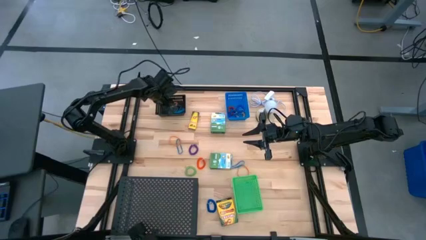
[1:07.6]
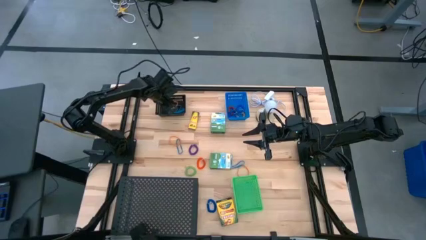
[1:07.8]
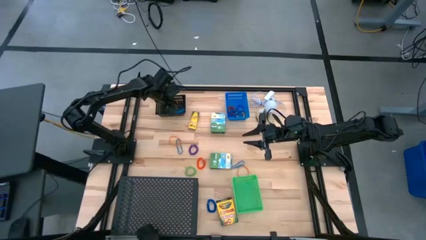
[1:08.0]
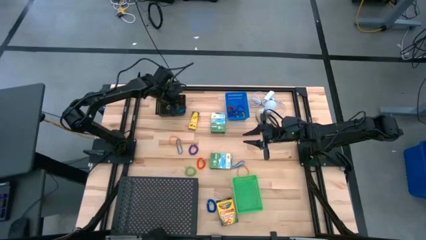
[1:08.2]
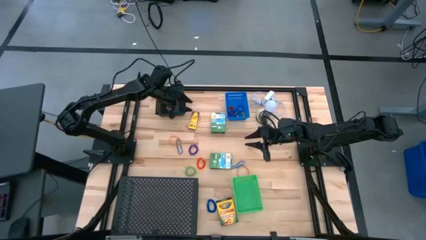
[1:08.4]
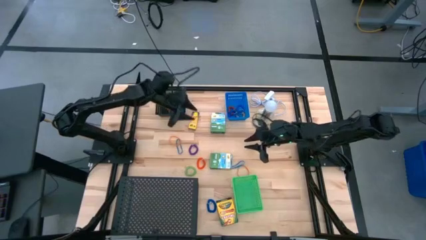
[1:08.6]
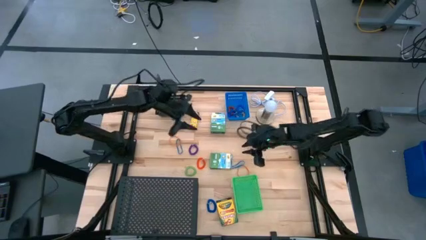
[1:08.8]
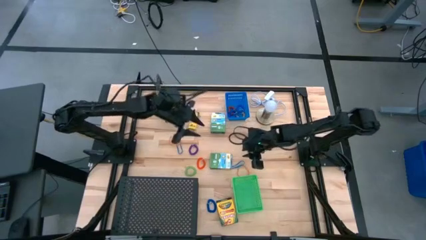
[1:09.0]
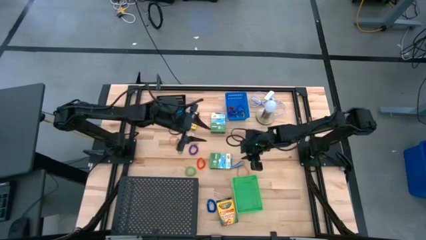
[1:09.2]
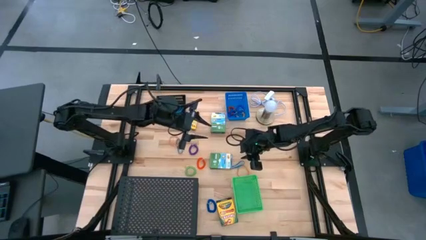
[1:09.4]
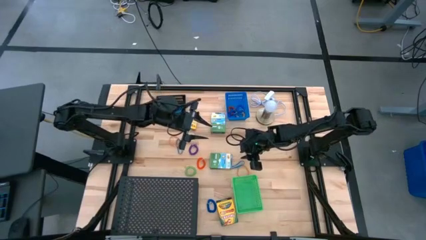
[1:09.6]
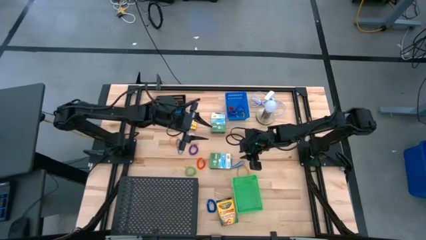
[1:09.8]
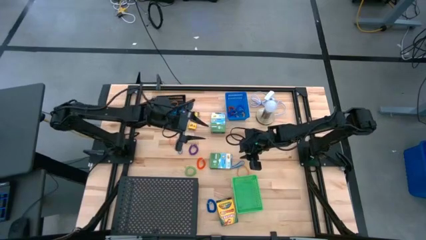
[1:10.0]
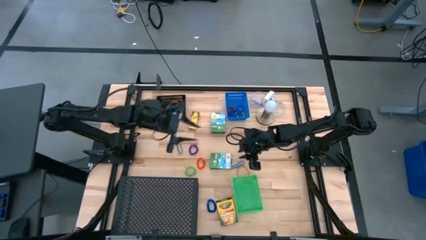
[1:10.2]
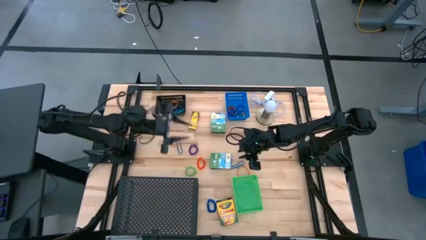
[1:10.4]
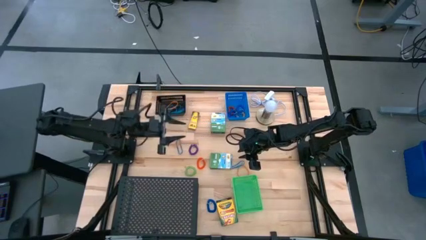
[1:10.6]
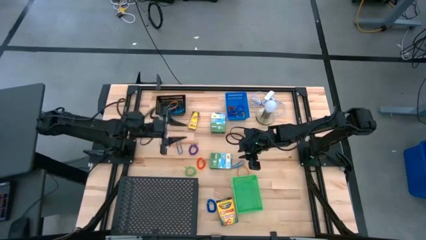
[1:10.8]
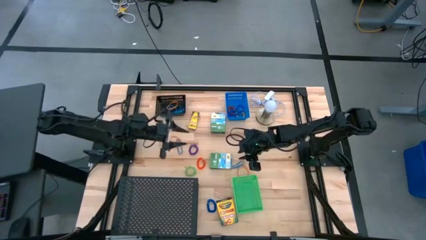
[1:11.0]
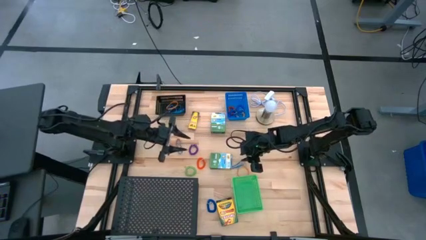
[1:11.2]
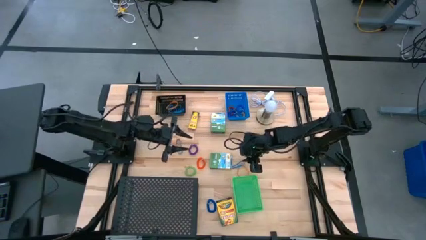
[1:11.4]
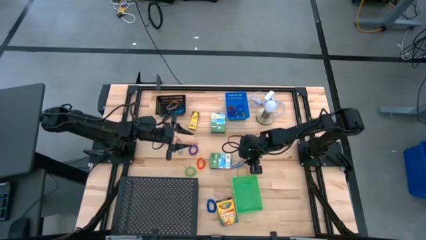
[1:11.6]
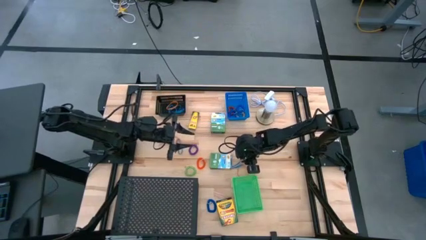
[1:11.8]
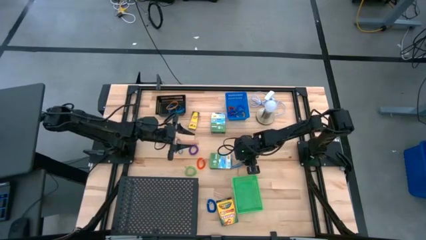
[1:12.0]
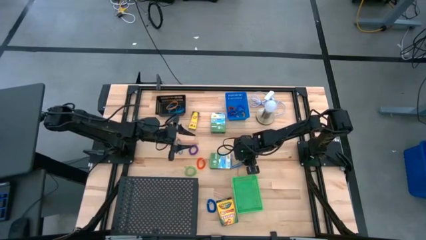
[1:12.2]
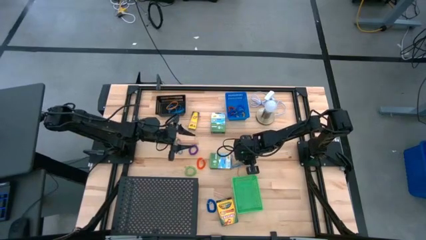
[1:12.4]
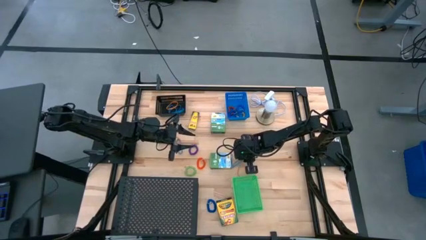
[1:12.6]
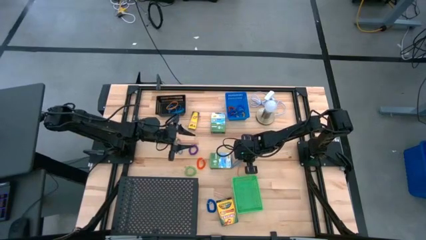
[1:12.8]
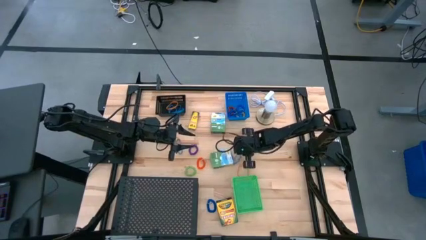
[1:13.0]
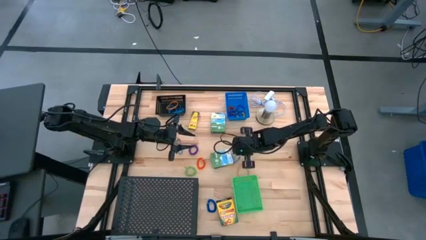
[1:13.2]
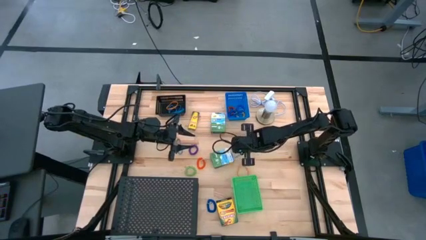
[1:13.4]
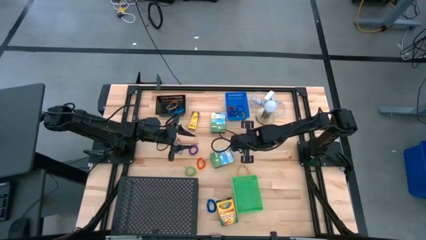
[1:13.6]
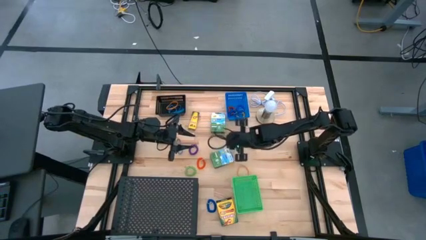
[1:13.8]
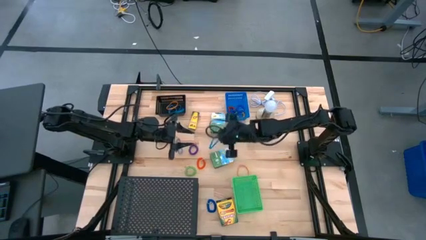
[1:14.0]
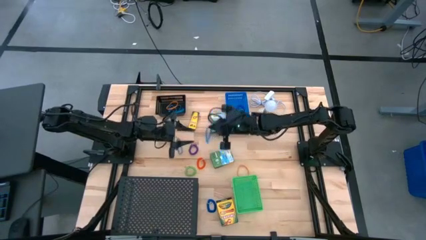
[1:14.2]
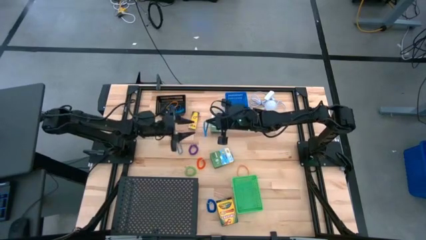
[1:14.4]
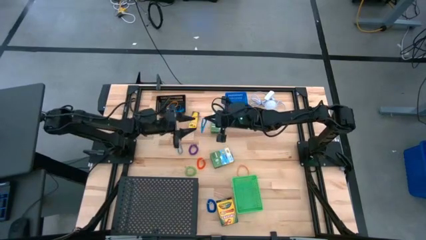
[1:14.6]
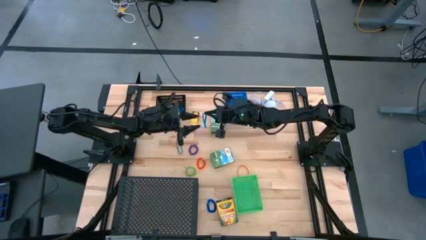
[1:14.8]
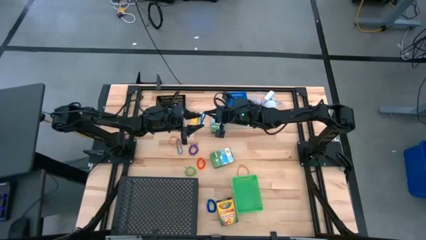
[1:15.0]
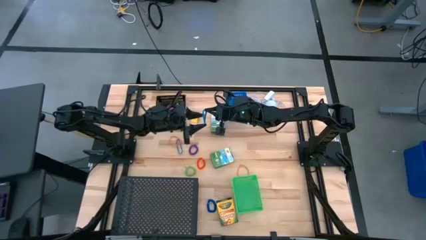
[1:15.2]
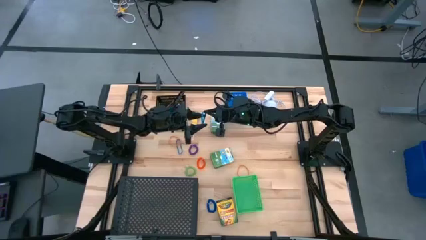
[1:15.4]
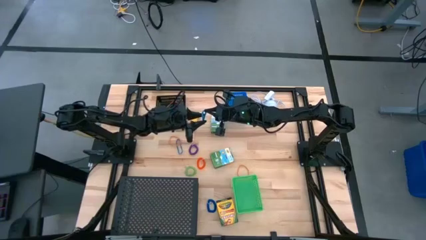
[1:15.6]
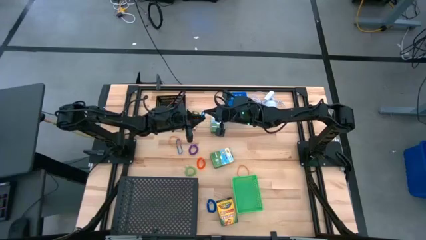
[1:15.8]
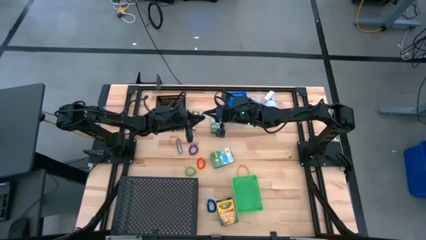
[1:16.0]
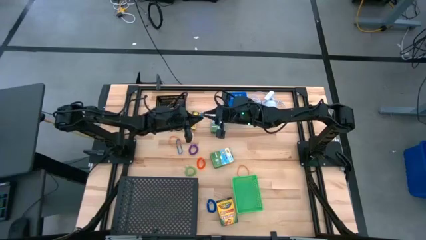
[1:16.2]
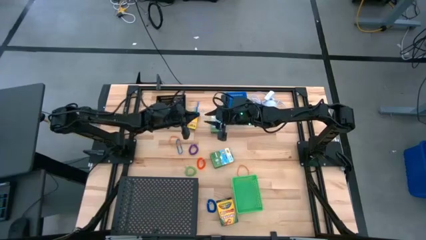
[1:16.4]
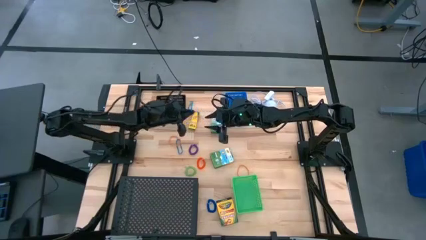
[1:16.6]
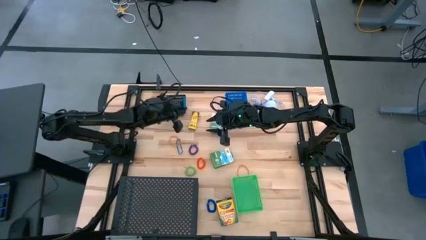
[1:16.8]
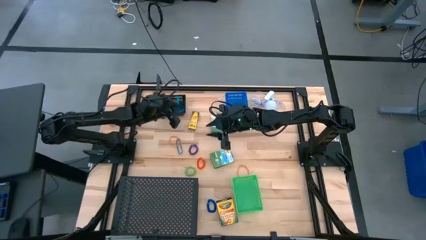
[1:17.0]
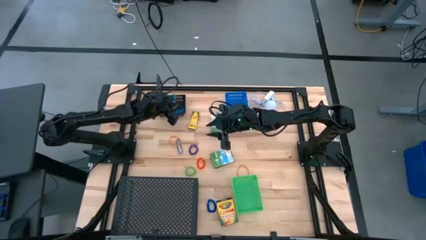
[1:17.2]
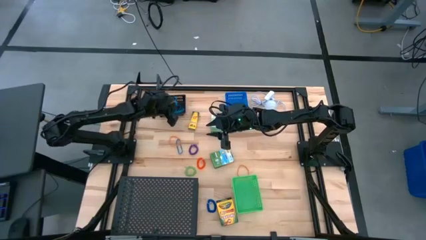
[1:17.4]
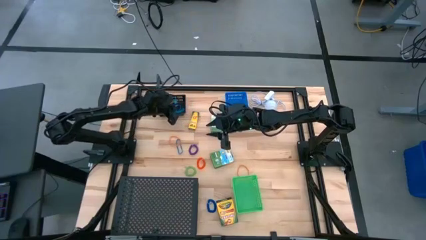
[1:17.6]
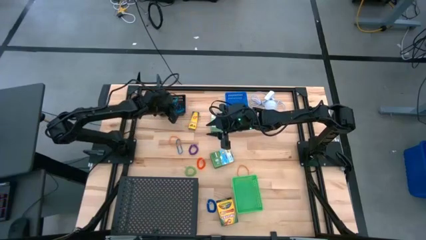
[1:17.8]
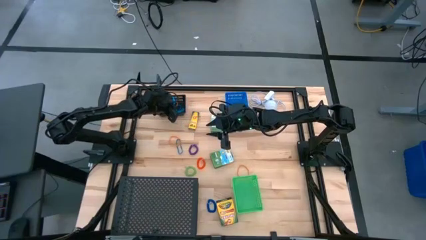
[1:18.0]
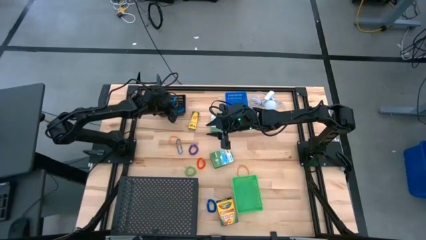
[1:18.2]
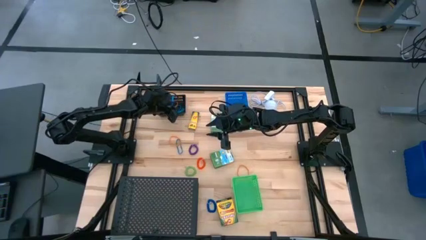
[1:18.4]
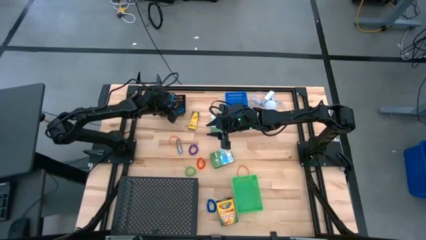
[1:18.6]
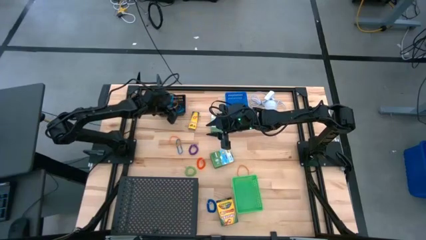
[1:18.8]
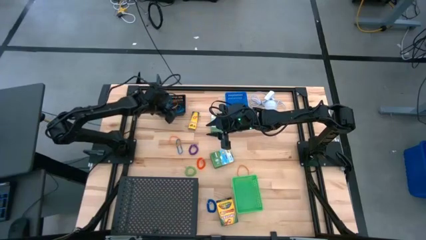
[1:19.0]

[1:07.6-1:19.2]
Task: Pick & Place Office Desk Supplies
Put the right blue rubber band into the black bin

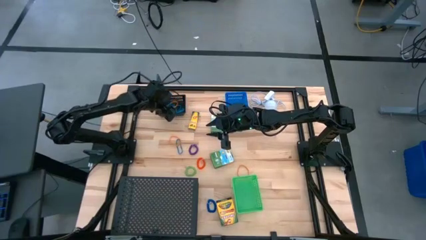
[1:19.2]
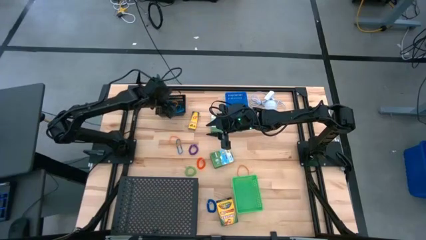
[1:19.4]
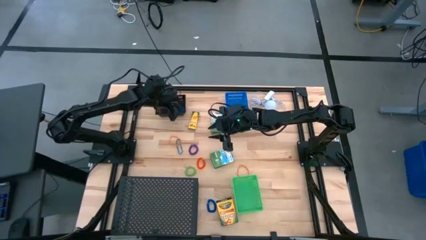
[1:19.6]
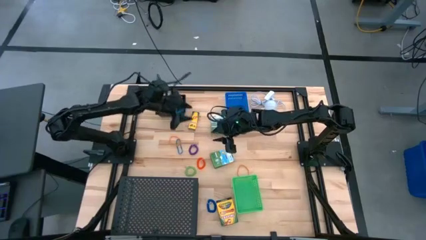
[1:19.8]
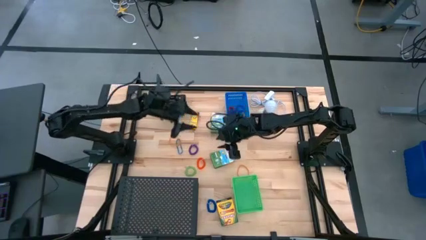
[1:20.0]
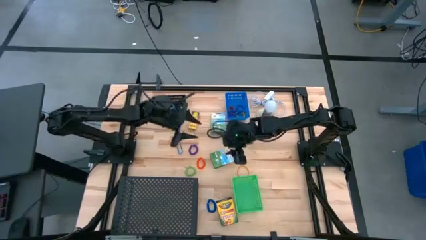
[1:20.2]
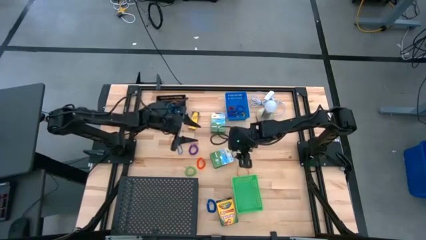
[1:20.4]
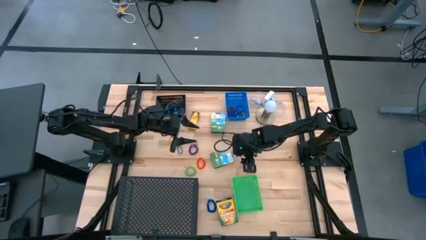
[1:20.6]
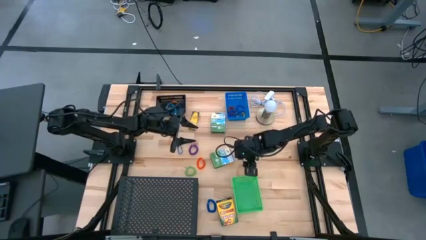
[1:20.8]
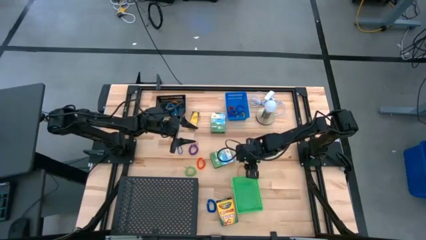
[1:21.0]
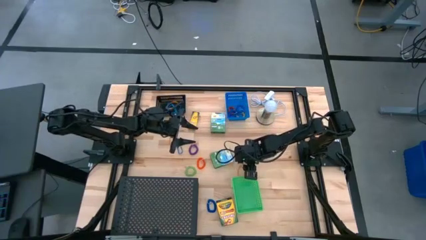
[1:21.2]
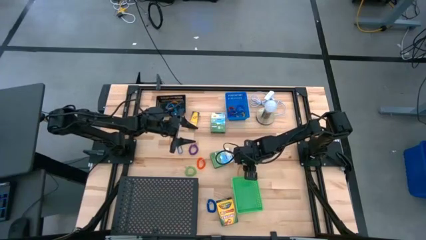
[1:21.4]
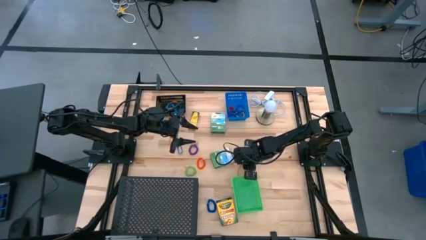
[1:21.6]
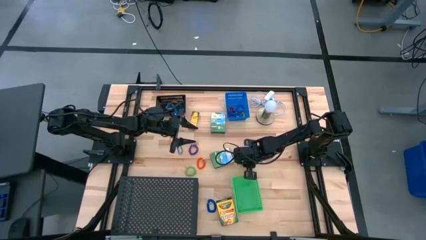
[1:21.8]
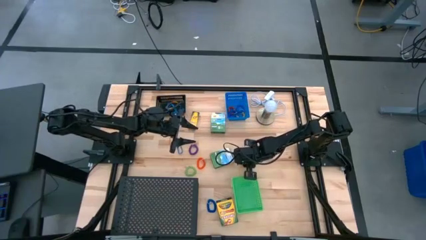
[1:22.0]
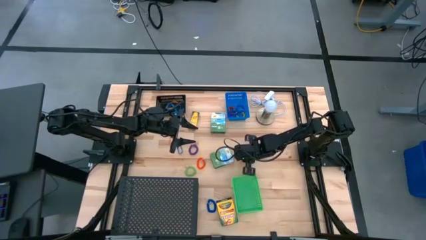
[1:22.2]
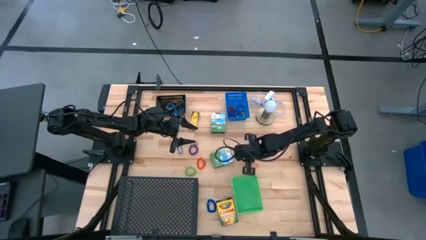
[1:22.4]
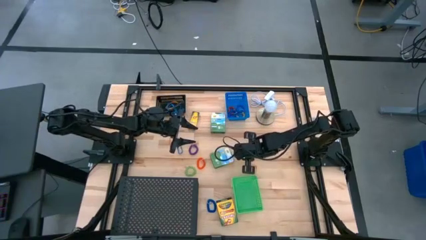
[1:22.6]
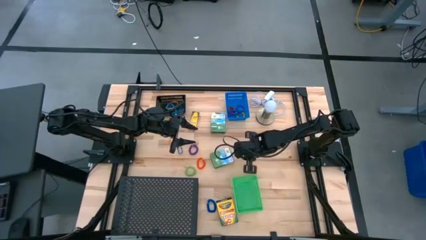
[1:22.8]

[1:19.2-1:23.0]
Put the right orange rubber band into the black bin
